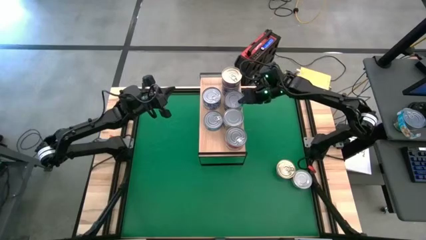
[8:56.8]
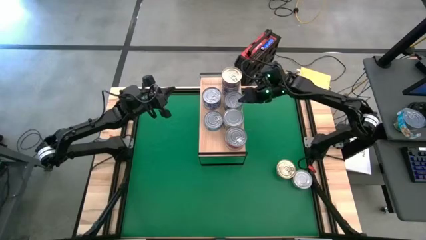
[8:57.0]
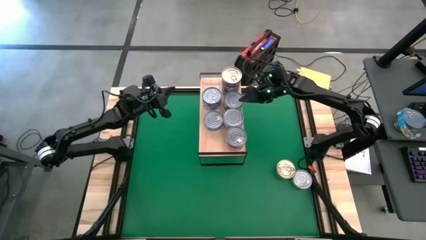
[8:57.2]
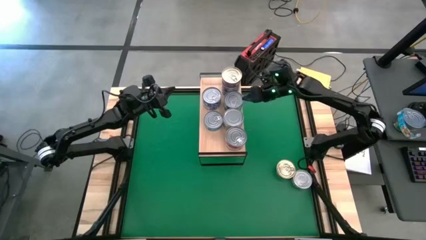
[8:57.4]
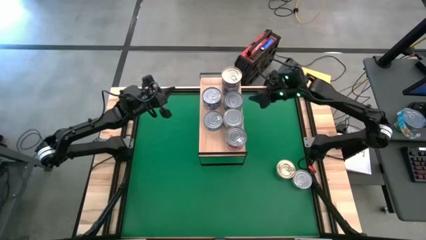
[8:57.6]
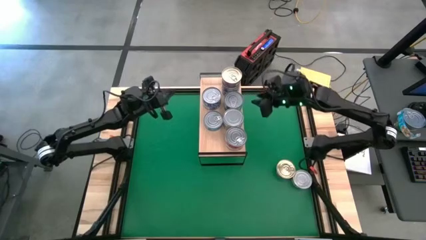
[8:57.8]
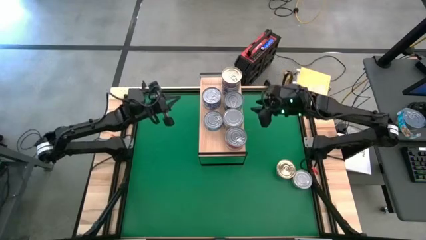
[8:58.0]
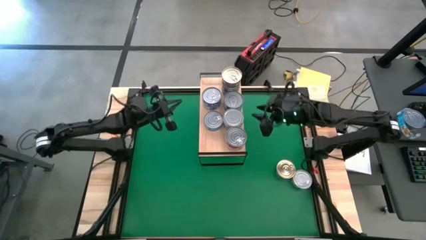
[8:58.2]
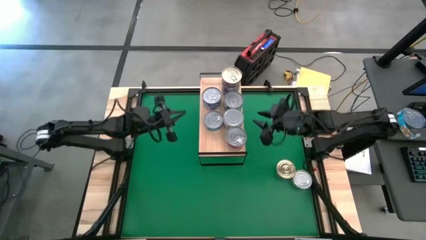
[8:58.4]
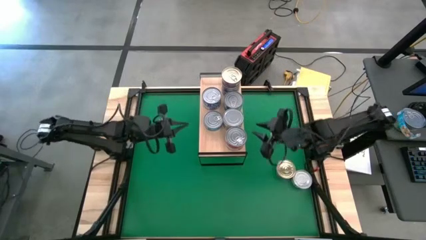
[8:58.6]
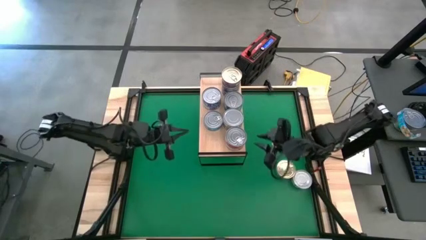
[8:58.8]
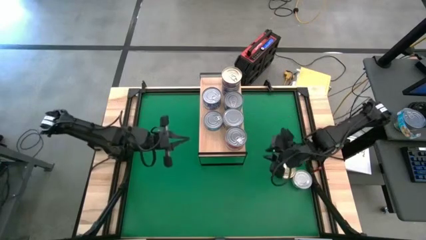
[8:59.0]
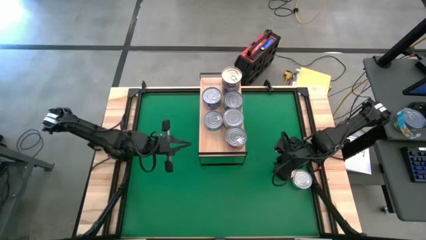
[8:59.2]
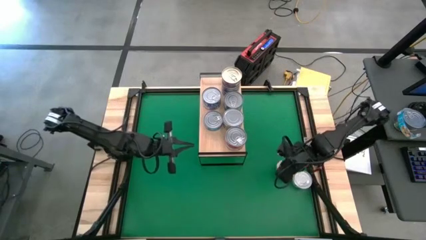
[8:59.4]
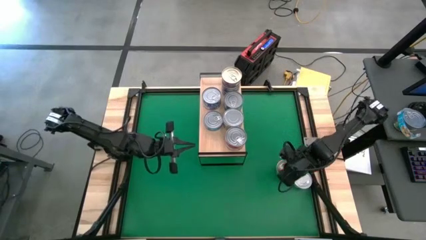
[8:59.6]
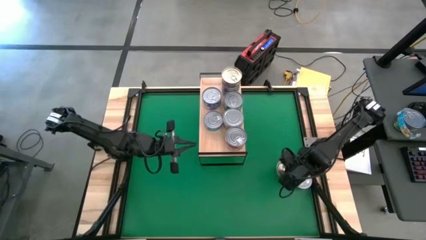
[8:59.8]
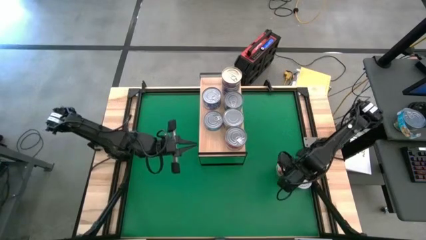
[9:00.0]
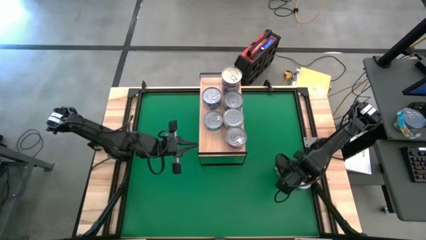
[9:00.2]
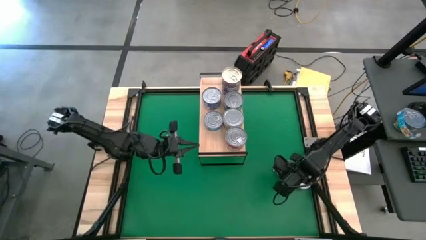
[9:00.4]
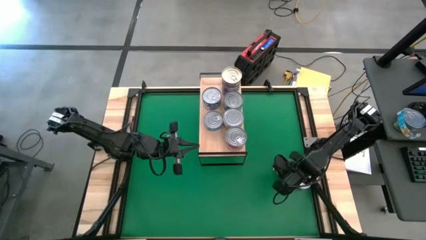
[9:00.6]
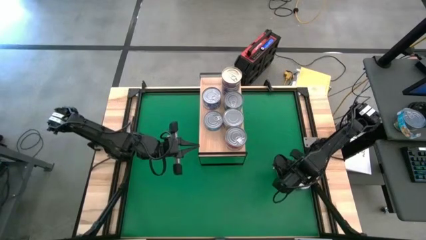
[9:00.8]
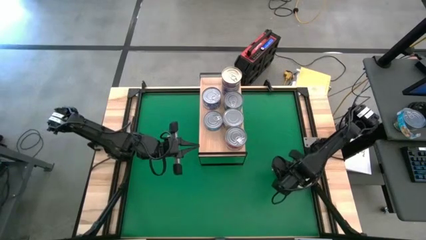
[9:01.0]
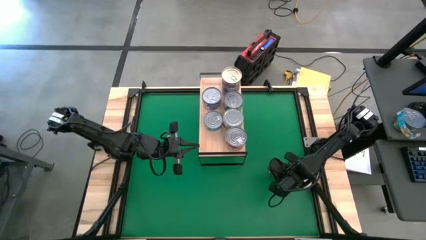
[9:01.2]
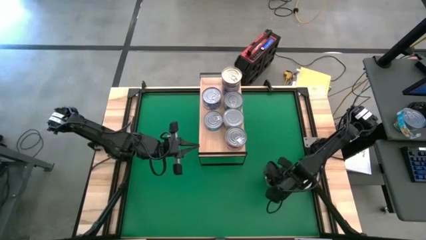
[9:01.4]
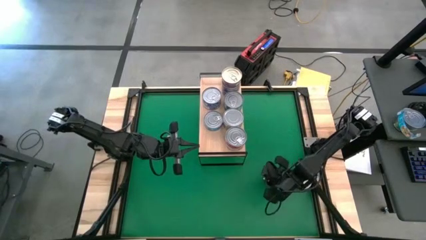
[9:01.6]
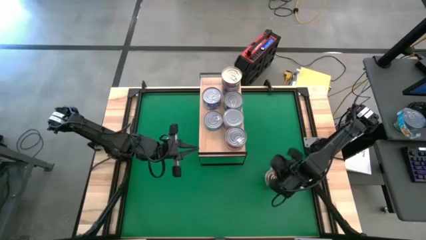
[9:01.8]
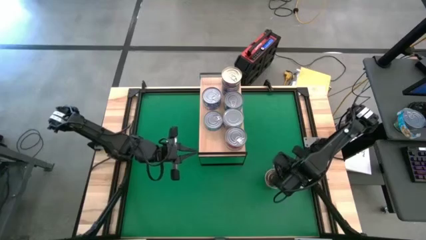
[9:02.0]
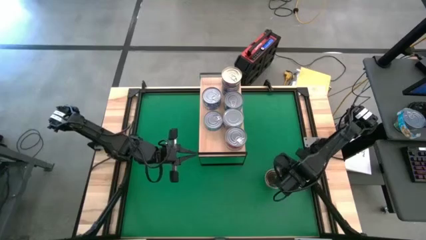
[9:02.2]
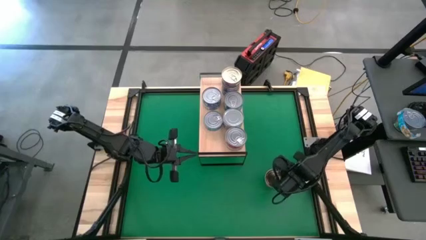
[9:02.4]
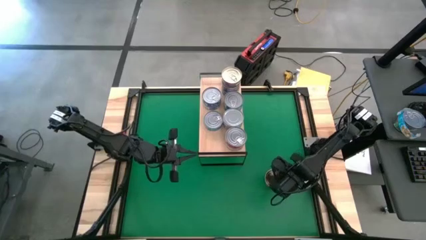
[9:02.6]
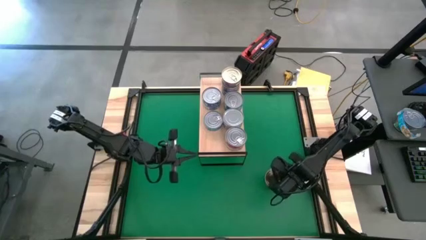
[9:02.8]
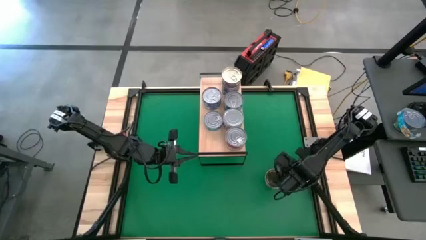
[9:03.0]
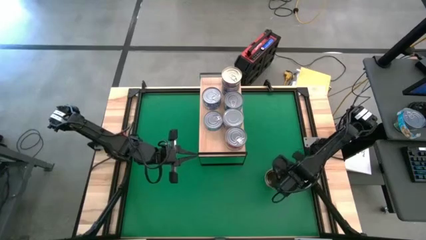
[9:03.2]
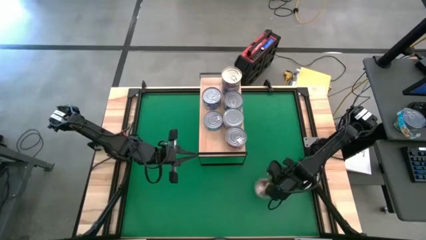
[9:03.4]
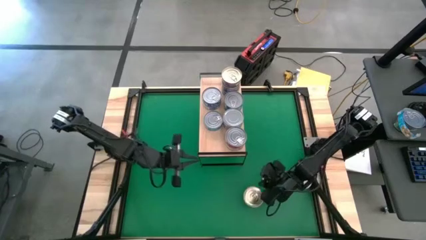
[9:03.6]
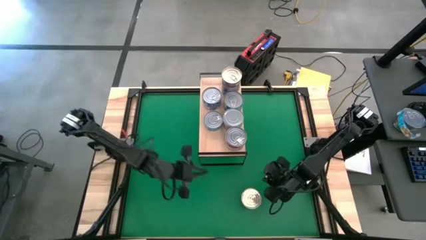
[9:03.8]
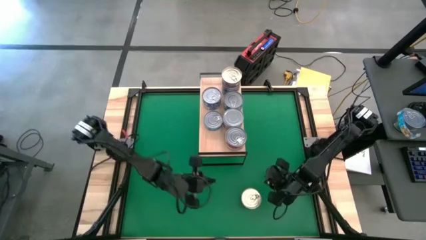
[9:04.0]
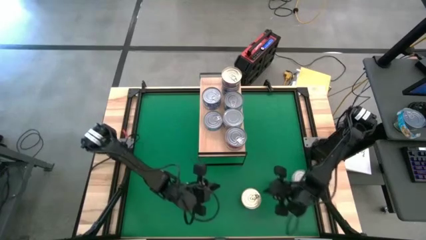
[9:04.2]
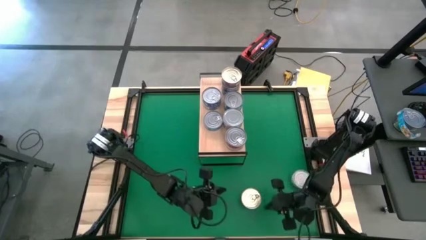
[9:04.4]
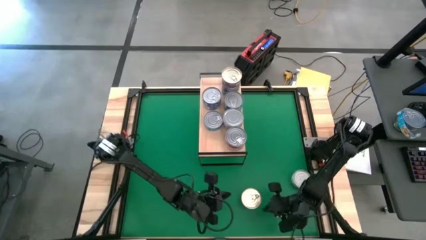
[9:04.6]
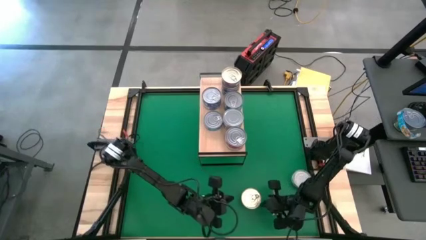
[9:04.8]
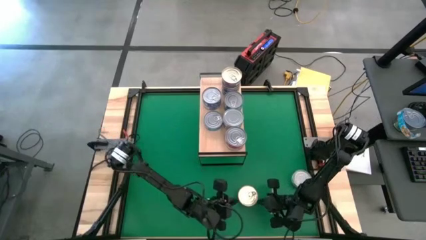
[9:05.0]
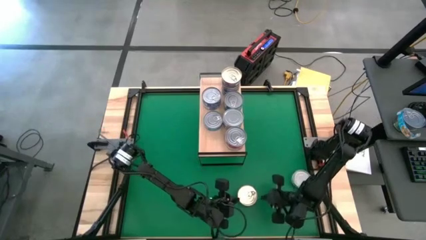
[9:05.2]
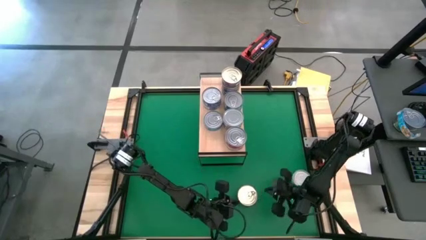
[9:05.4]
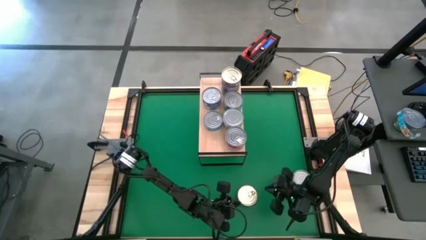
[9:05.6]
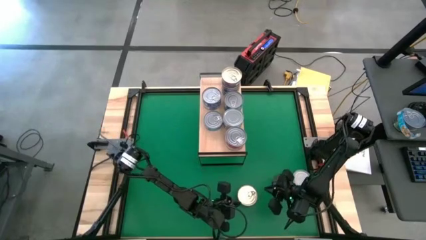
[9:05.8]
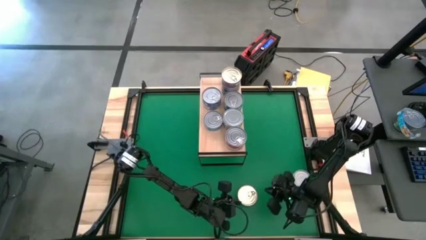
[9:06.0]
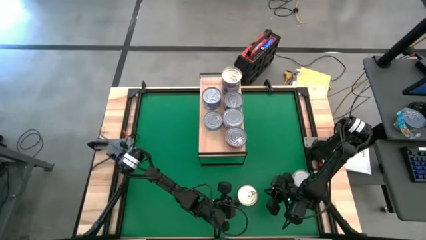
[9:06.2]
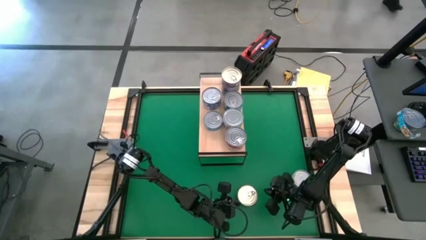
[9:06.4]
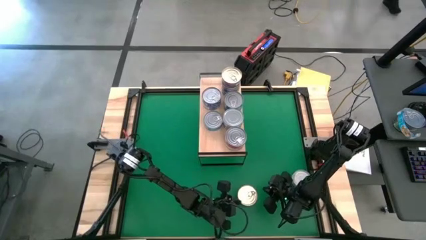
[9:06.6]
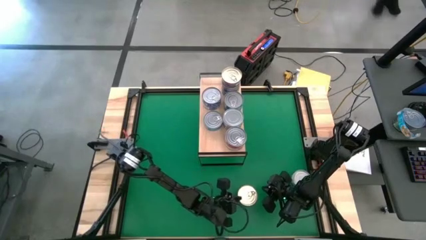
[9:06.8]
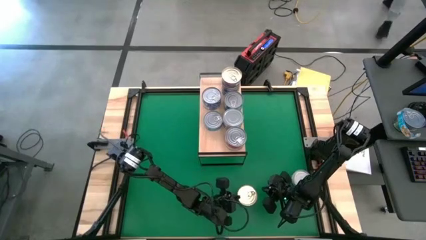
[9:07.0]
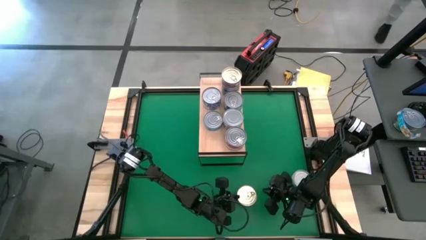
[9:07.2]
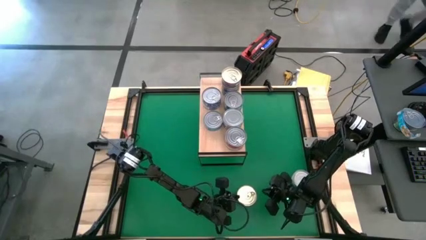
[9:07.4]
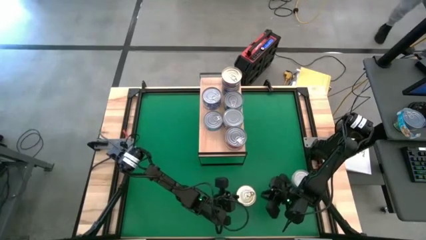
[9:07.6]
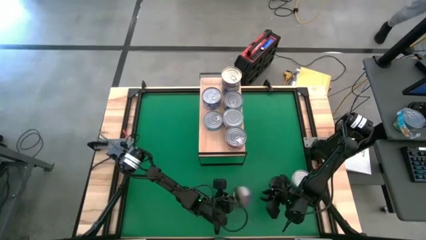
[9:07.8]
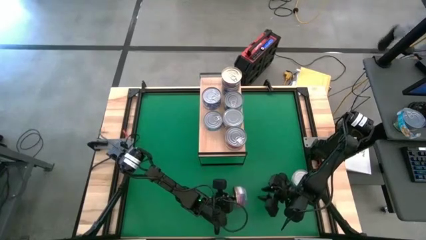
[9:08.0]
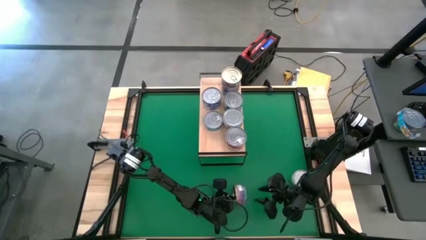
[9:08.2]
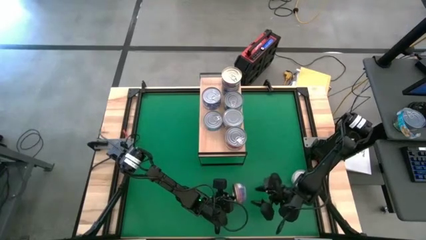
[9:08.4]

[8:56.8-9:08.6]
Task: Stack canned seafood by type on shelf
Stack the dark blue tuna can on top of the dark blue can on the shelf
